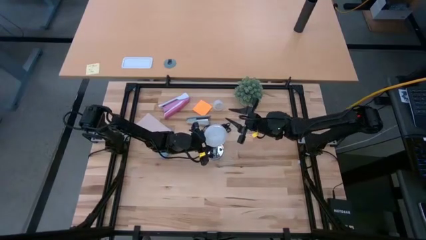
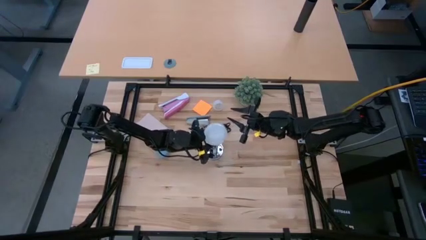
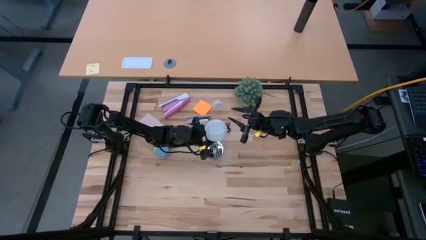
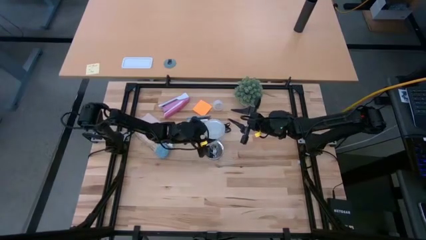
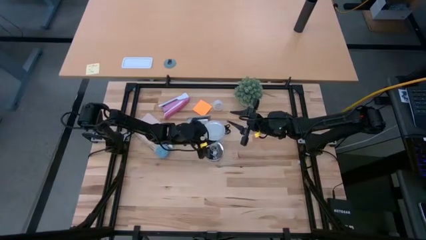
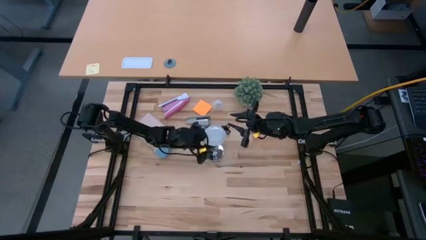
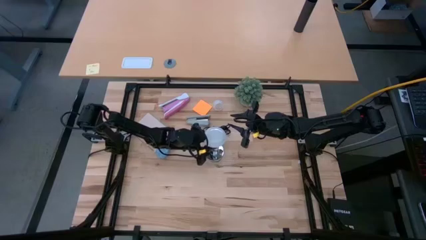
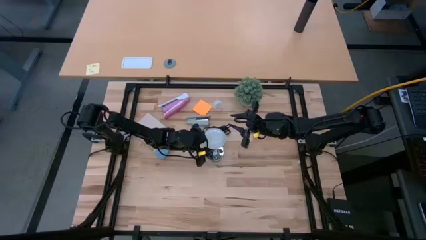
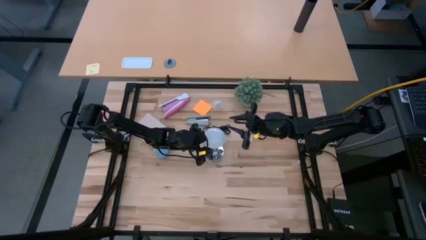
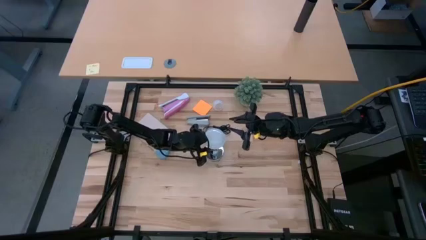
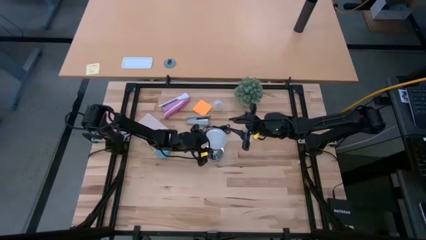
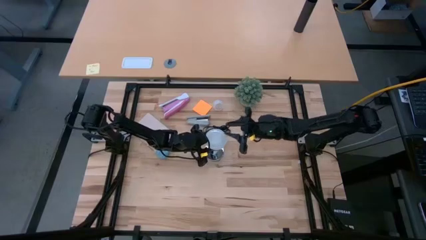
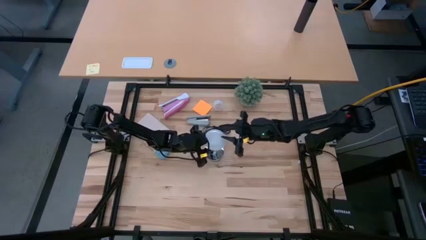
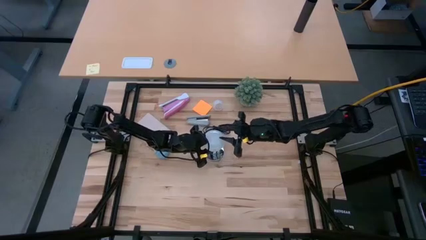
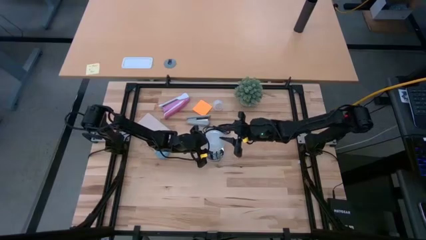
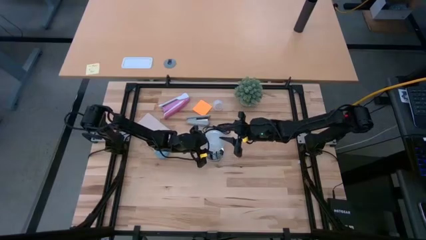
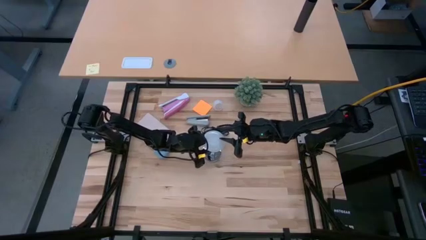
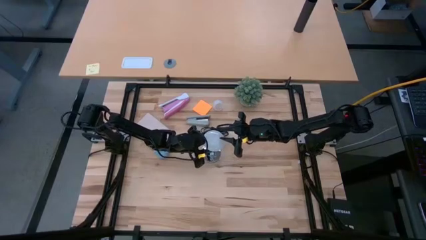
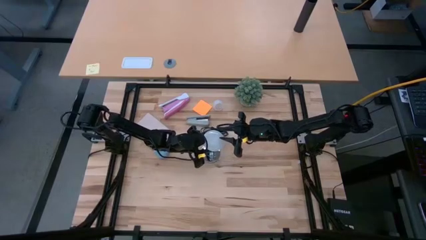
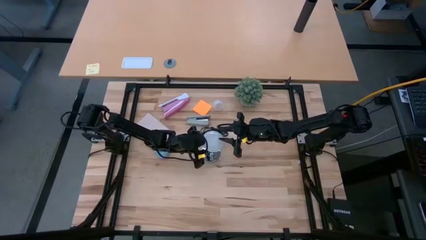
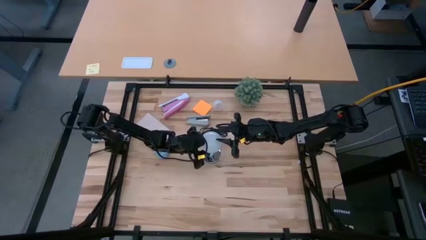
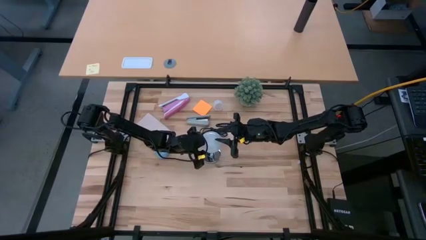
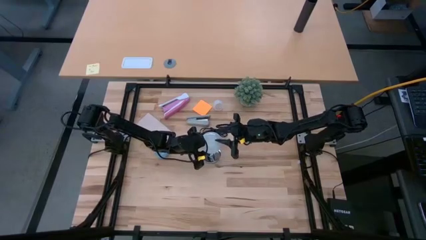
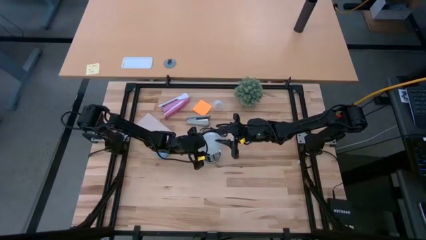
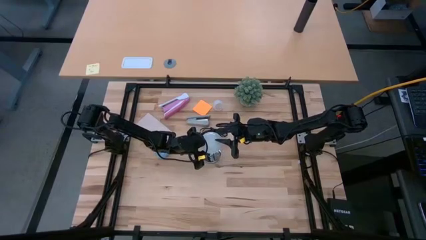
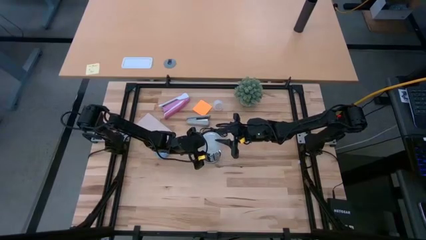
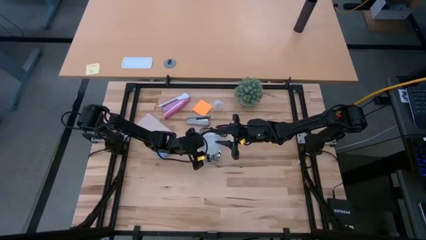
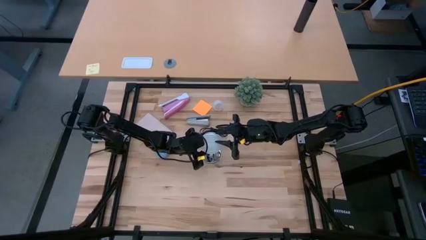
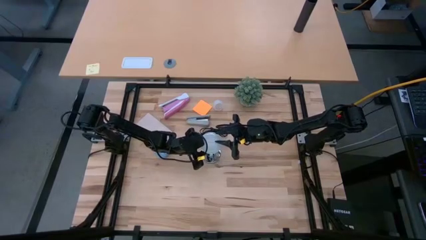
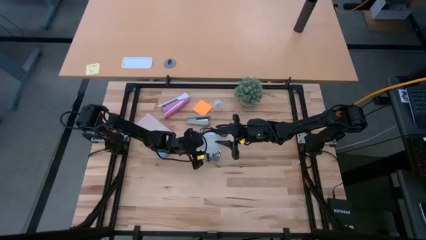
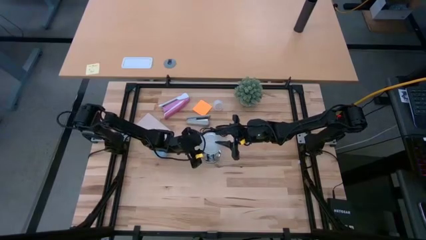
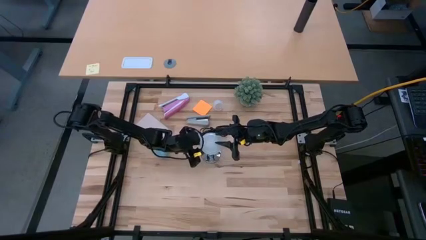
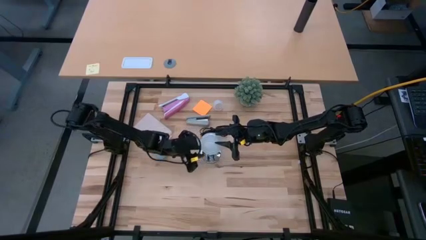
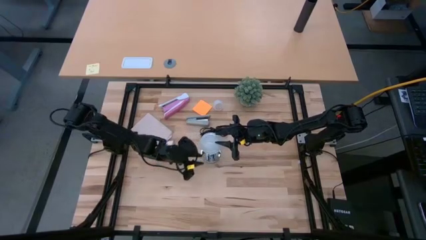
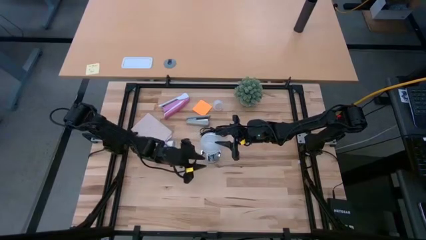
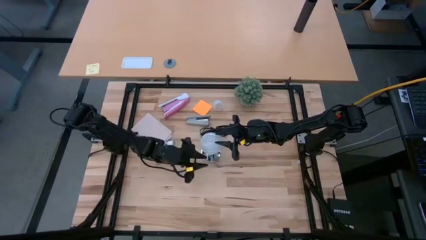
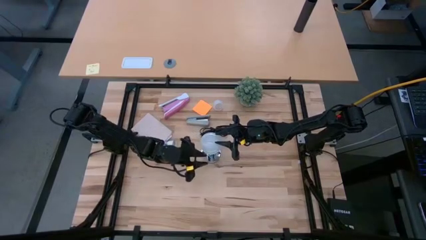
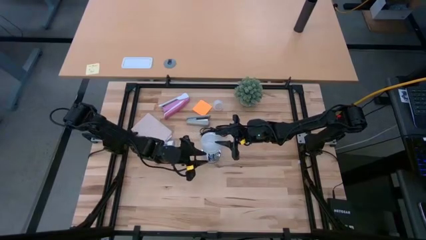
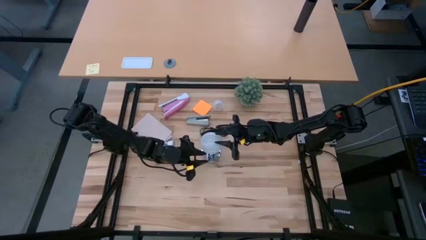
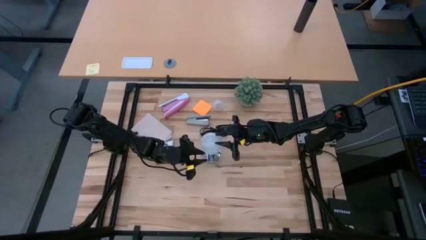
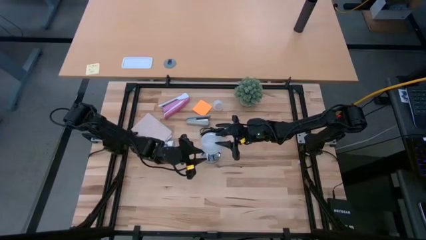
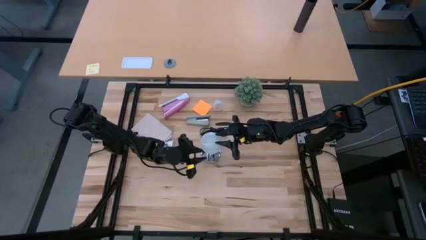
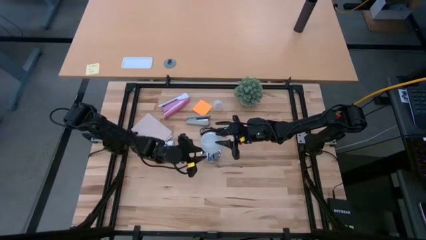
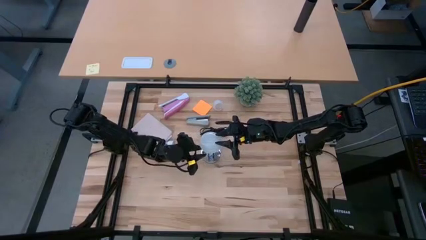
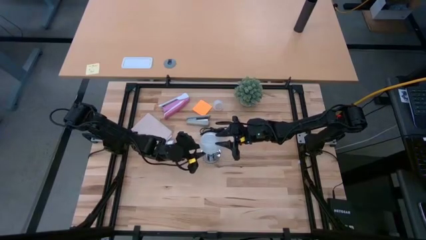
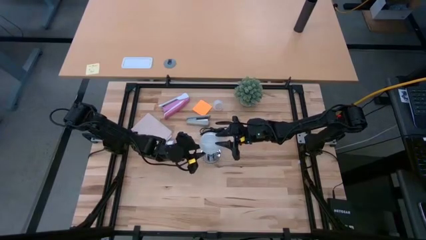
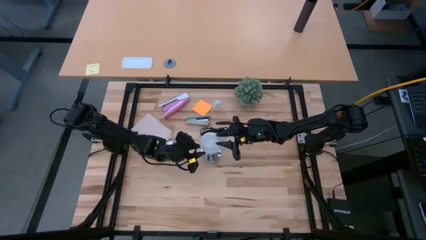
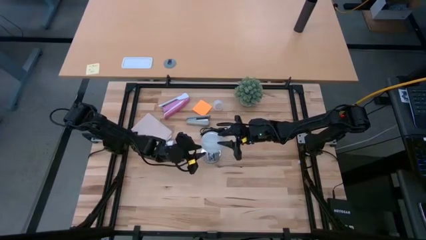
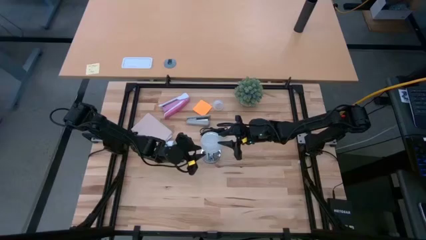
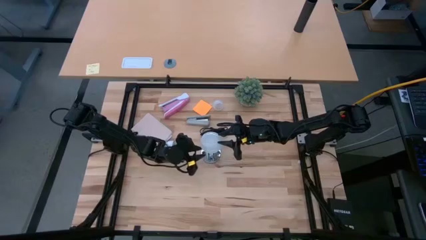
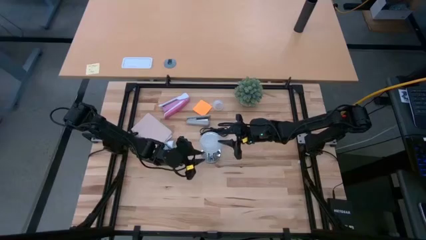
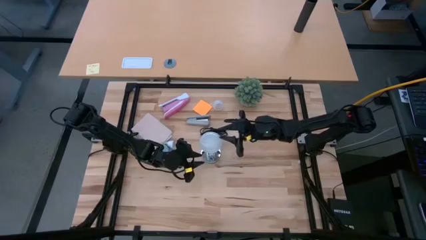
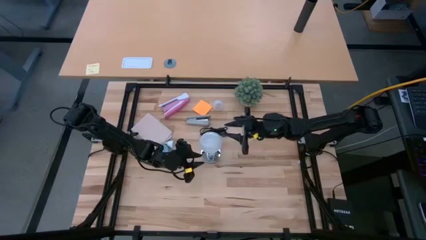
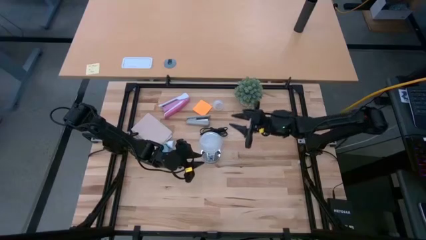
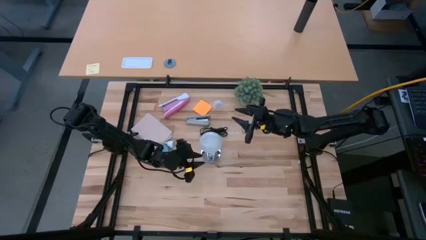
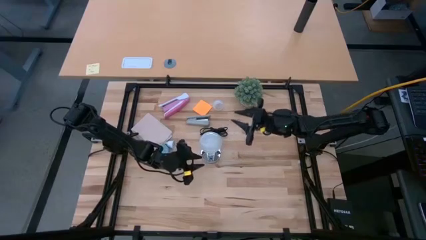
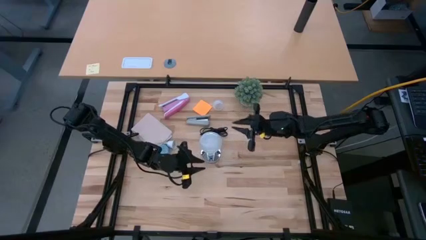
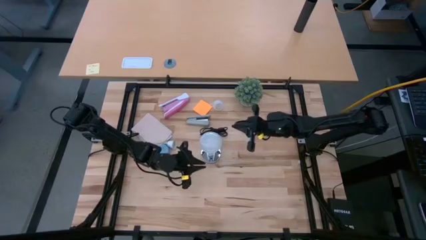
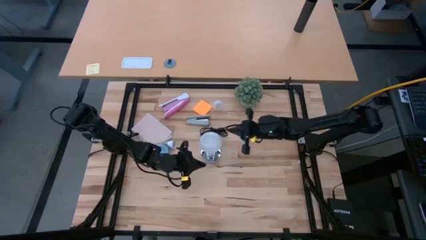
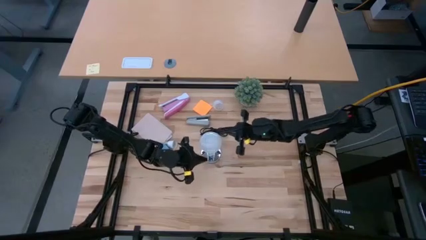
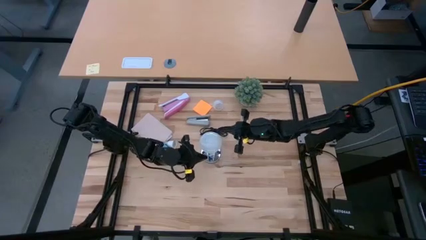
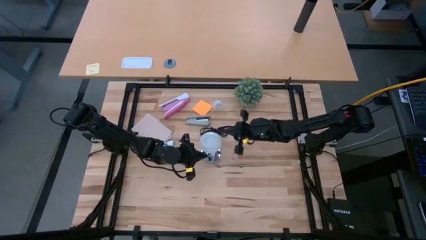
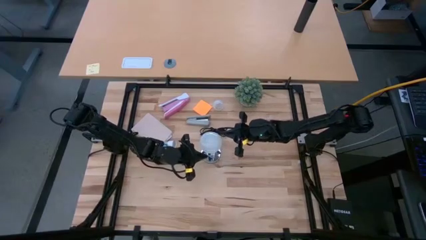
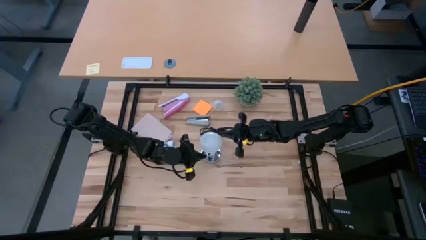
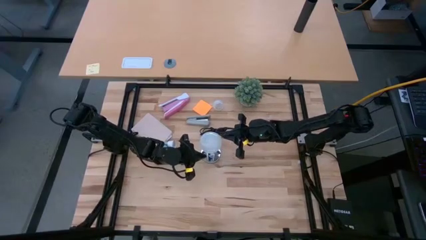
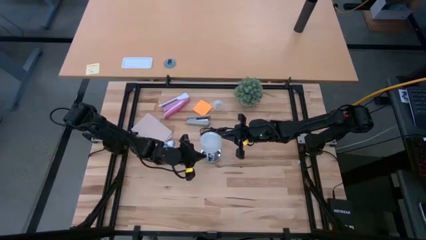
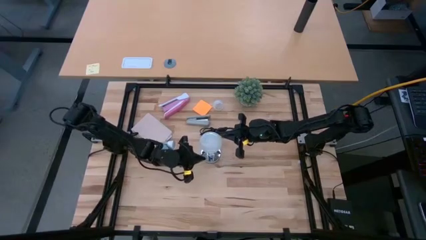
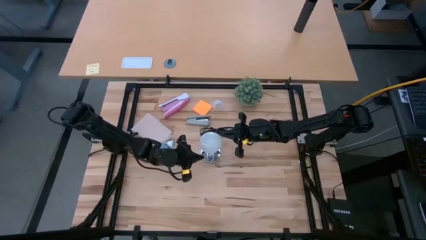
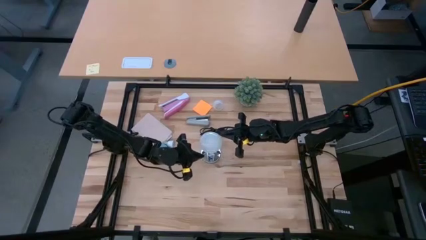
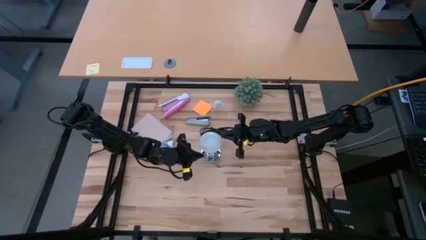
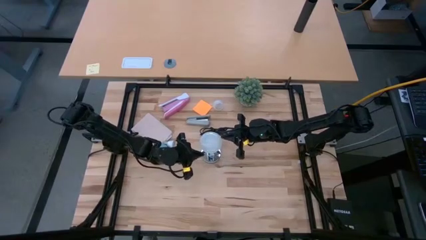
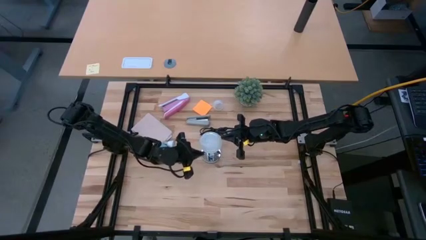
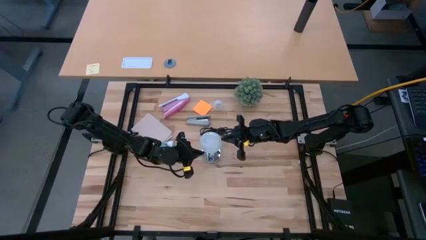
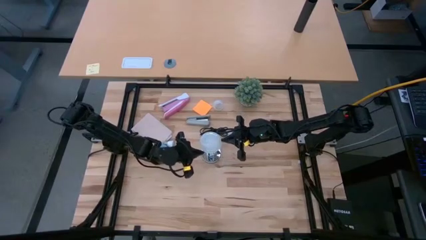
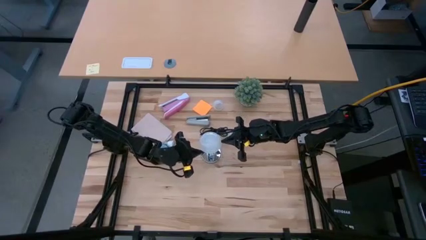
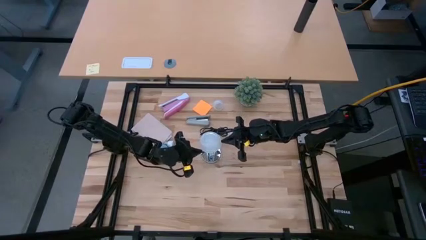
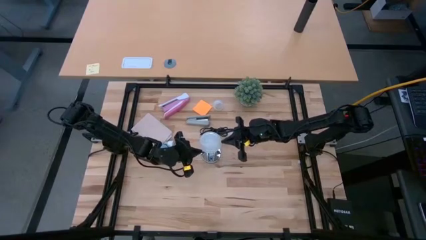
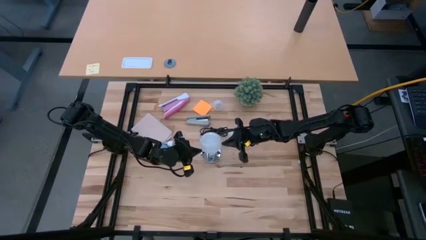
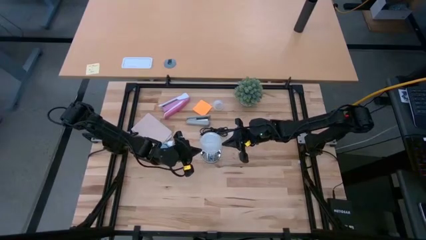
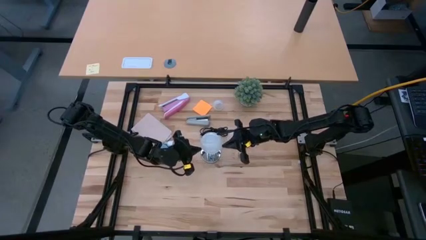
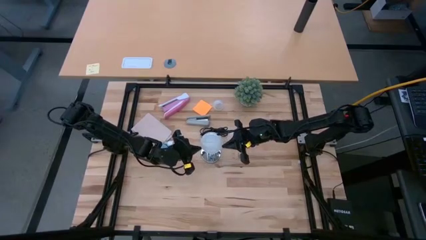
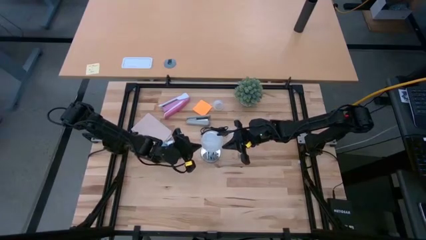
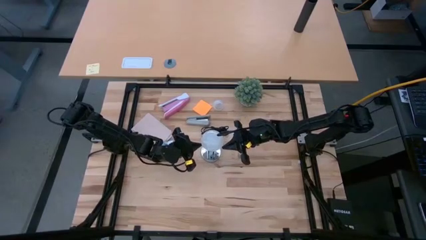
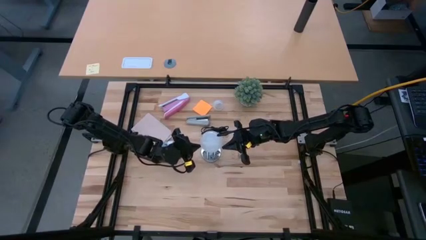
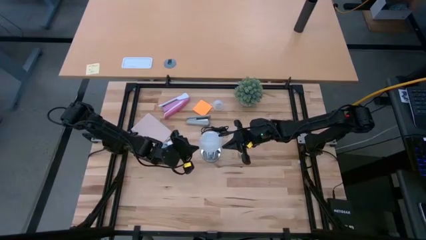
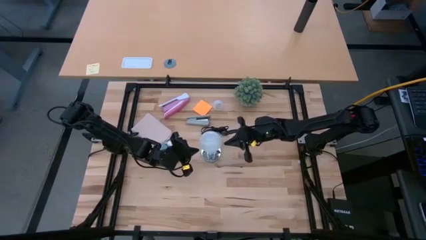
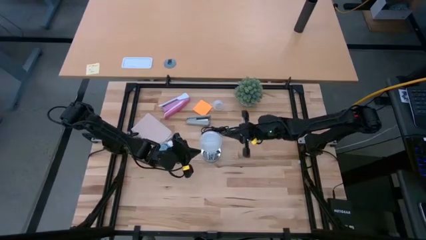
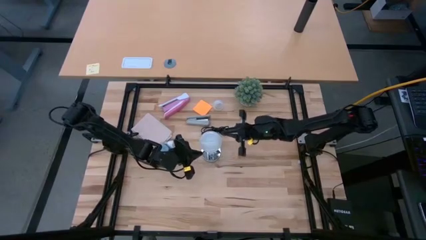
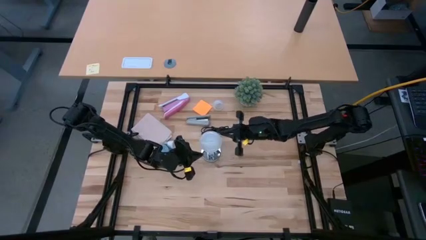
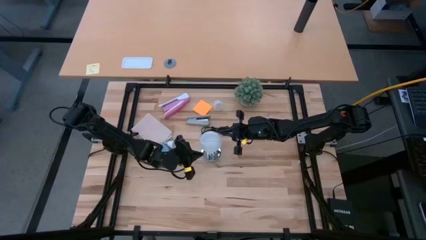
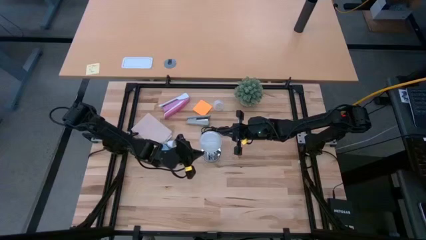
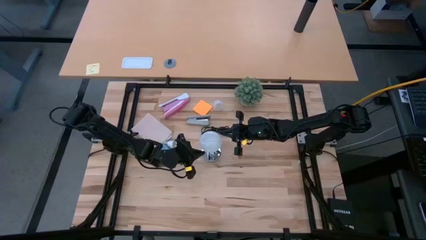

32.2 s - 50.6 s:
Task: Screw lightbulb
Insert the lightbulb on the lamp
